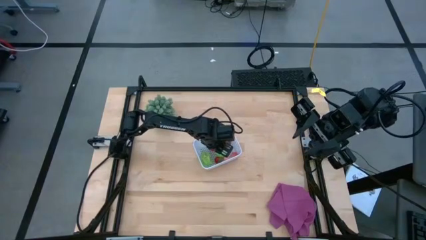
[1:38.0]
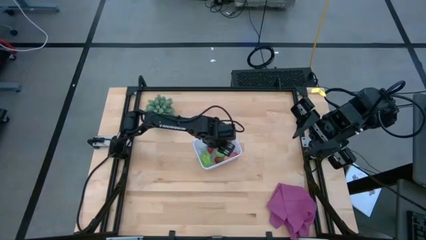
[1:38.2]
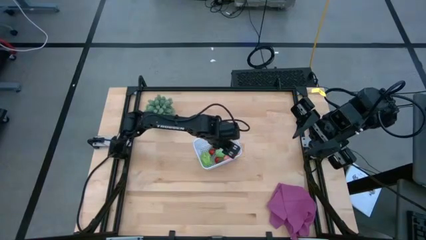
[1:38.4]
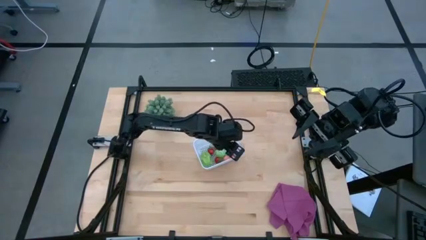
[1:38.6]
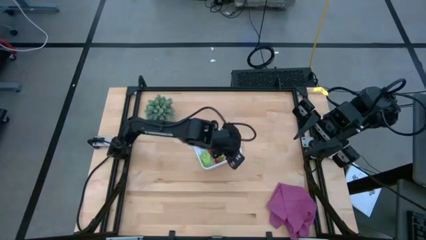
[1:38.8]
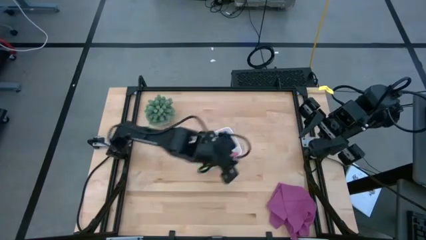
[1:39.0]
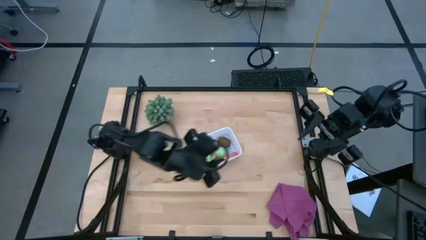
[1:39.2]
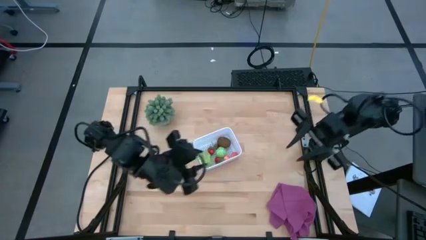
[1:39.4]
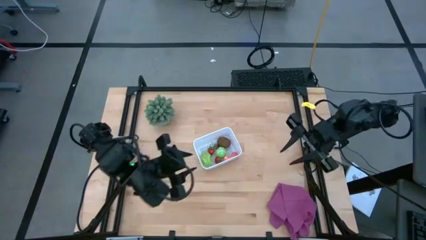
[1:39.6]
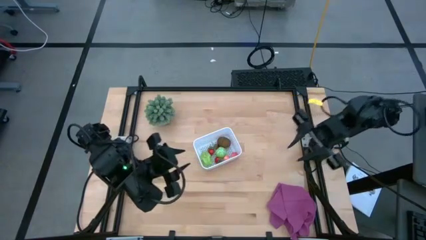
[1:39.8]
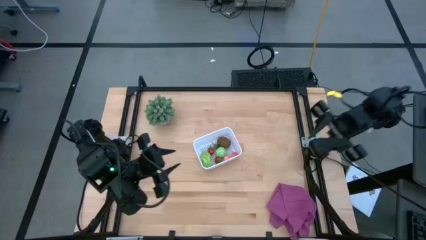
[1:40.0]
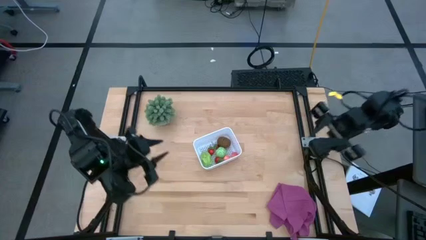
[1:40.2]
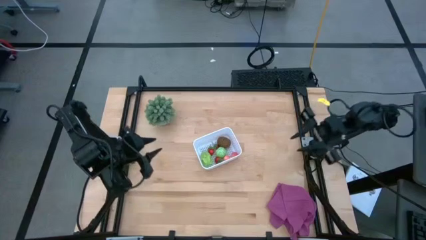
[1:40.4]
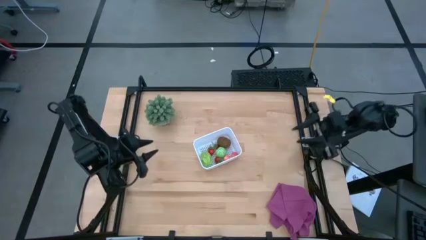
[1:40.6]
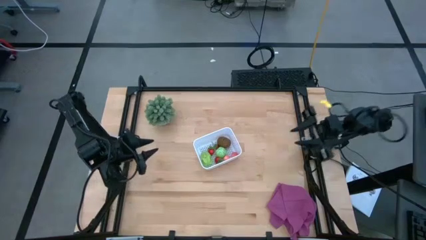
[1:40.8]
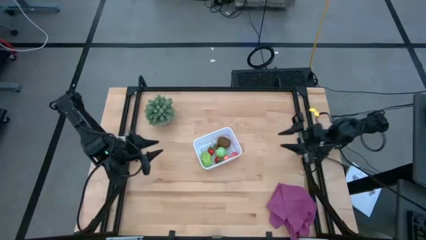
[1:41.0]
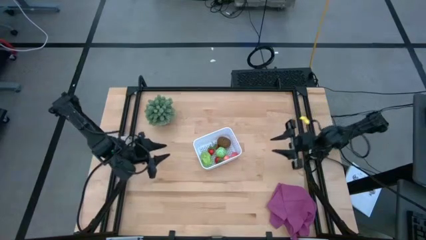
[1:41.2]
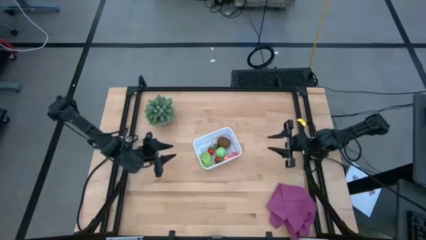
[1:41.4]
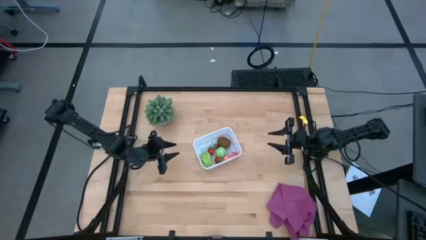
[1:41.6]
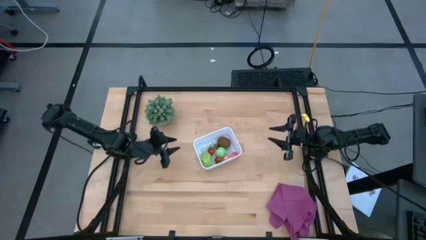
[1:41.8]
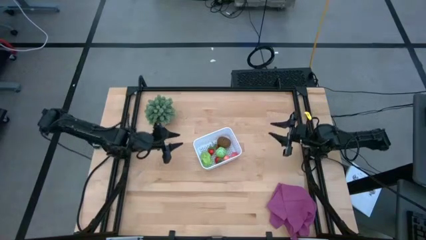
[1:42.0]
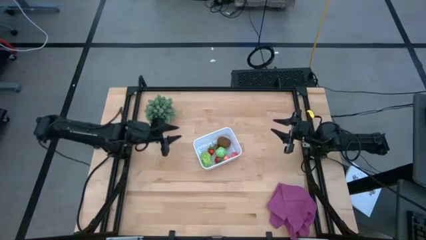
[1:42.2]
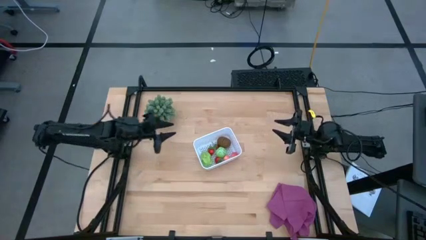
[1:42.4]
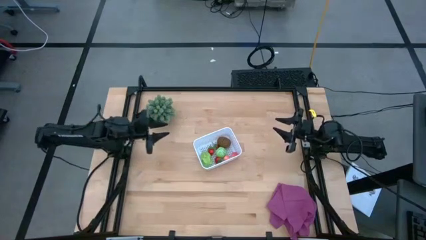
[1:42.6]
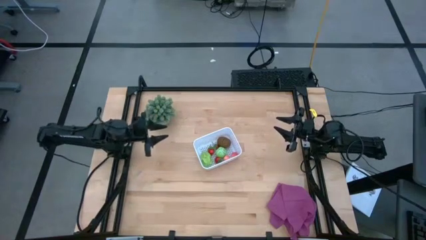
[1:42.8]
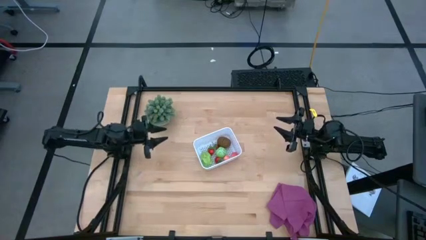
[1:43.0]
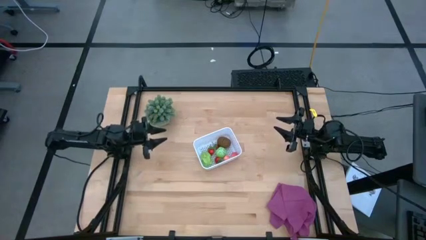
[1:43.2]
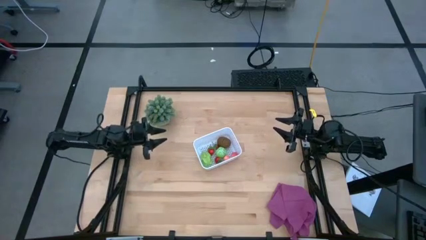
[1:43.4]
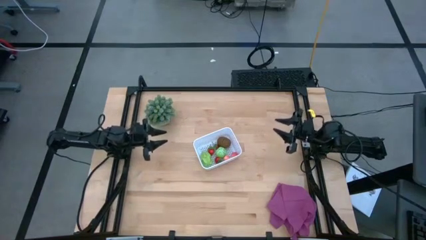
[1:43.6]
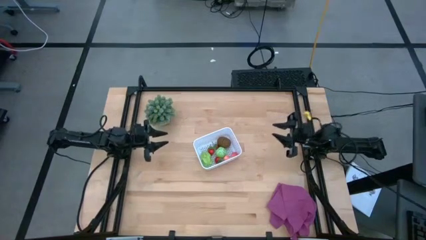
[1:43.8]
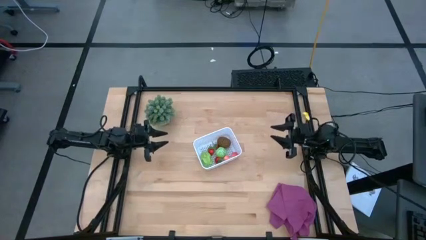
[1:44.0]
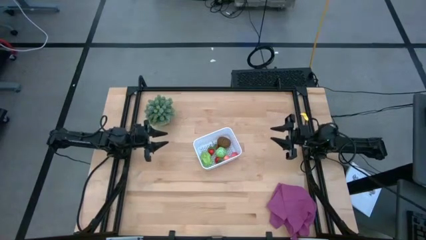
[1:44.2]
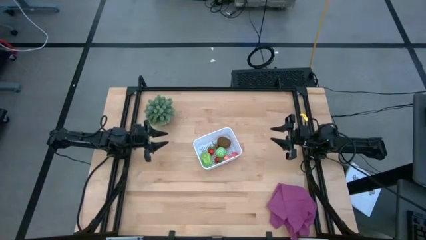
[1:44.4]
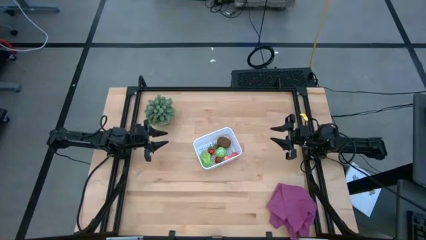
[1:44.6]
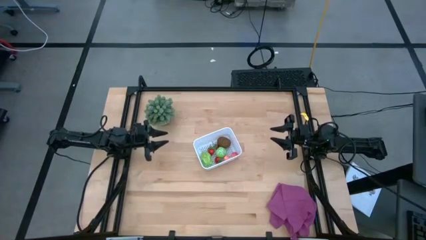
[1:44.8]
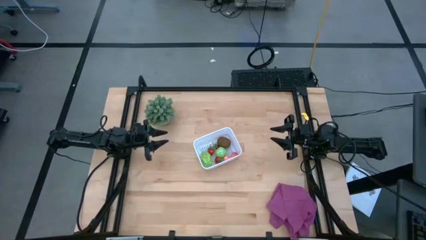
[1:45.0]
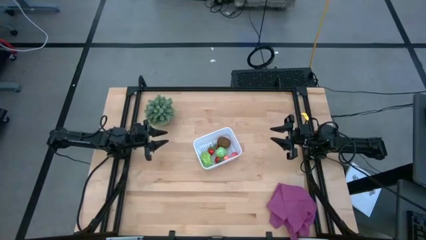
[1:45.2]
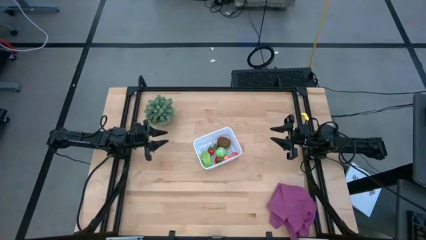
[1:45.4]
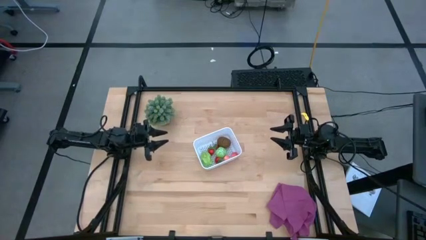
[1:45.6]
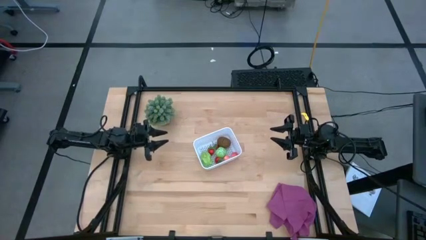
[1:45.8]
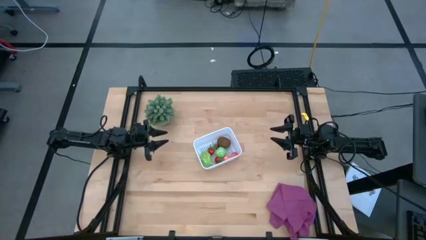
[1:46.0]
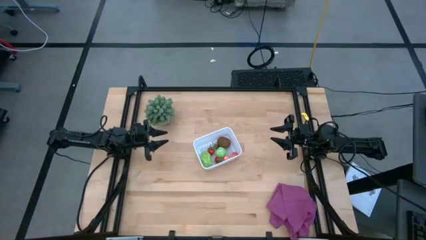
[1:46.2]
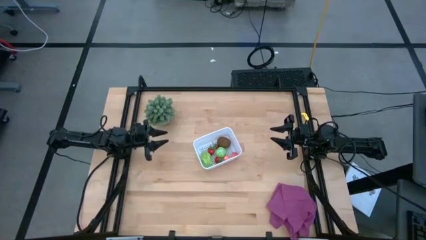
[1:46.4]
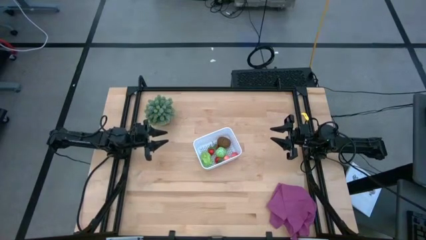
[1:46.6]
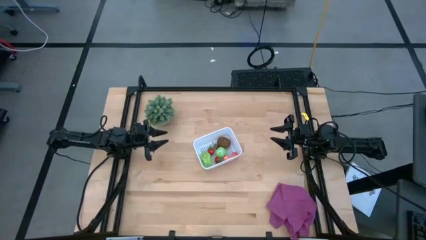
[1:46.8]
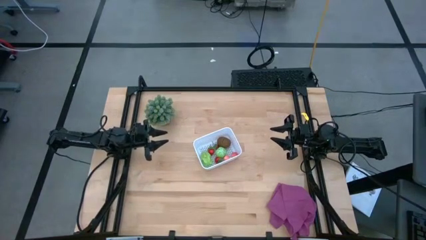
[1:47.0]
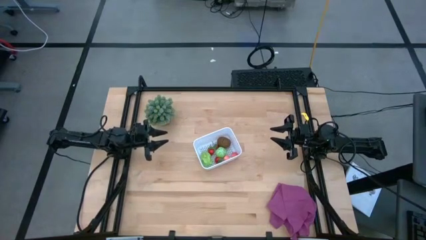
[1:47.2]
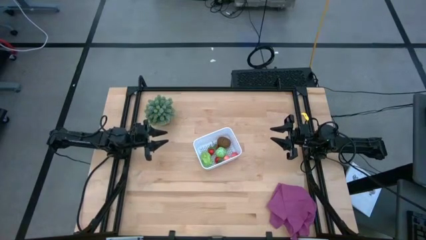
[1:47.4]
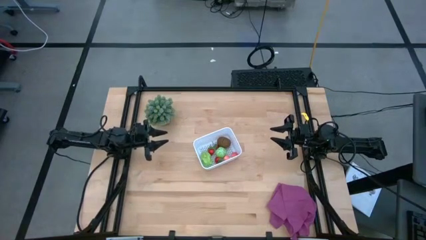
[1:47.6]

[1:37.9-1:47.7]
Task: Pick and placing Produce into tupperware
Return to Home Position
